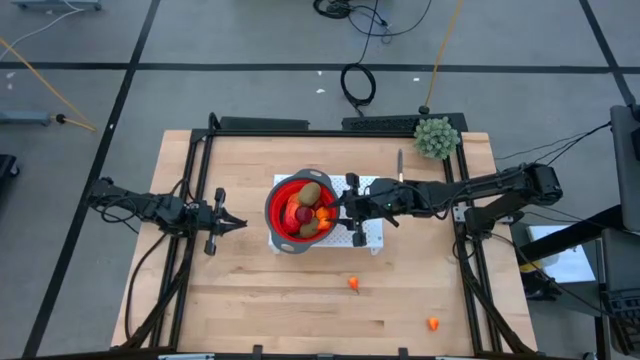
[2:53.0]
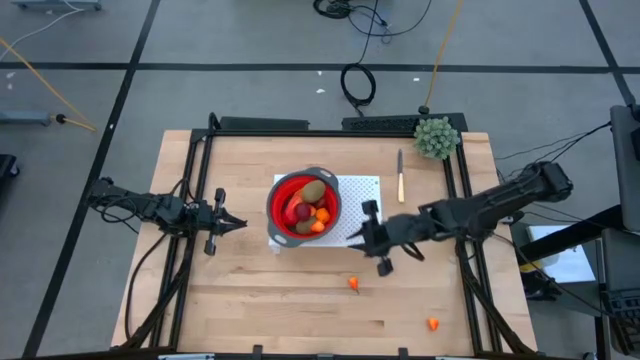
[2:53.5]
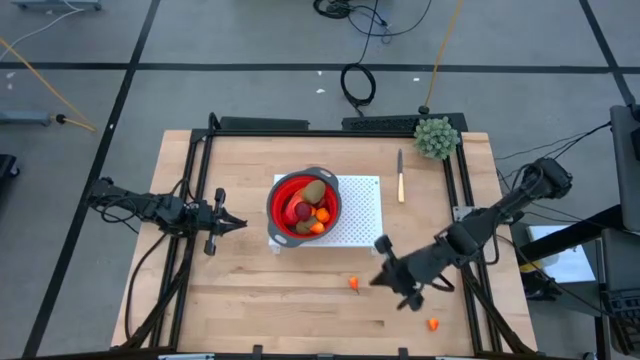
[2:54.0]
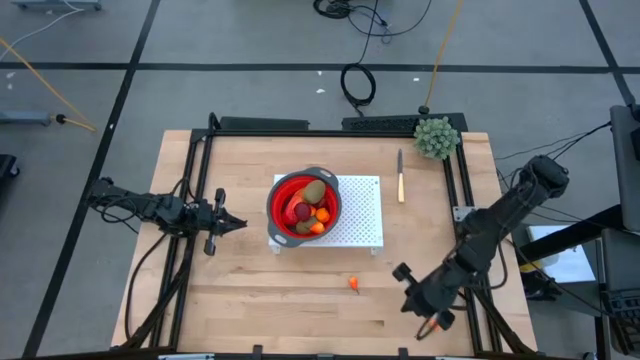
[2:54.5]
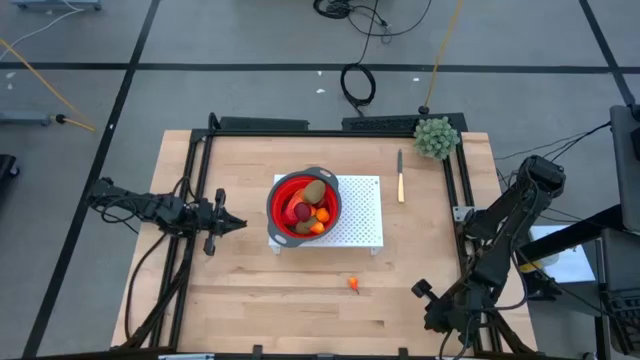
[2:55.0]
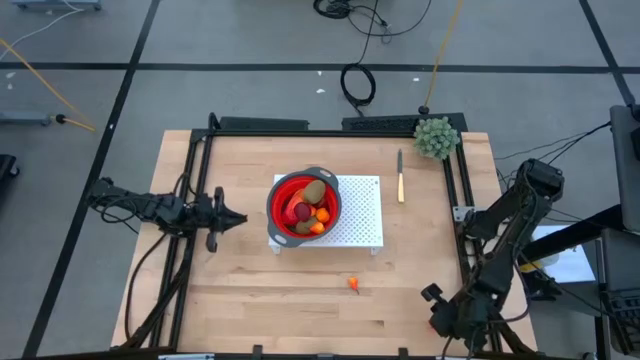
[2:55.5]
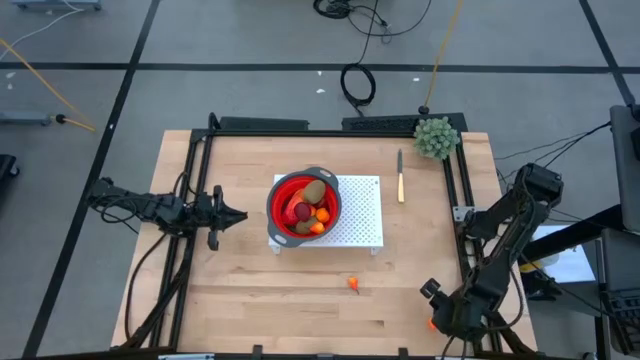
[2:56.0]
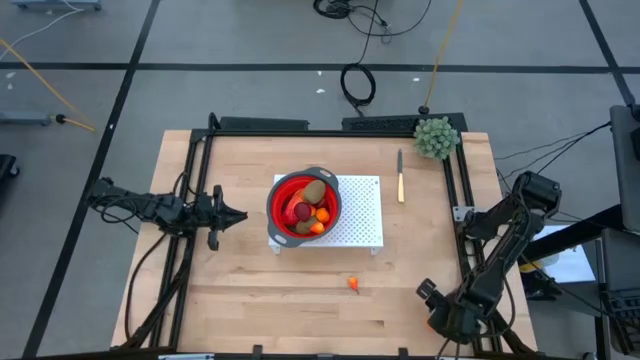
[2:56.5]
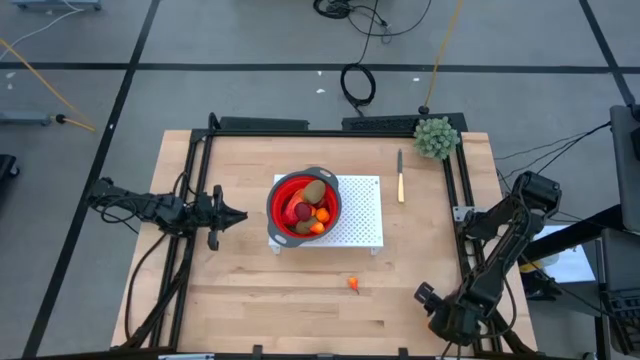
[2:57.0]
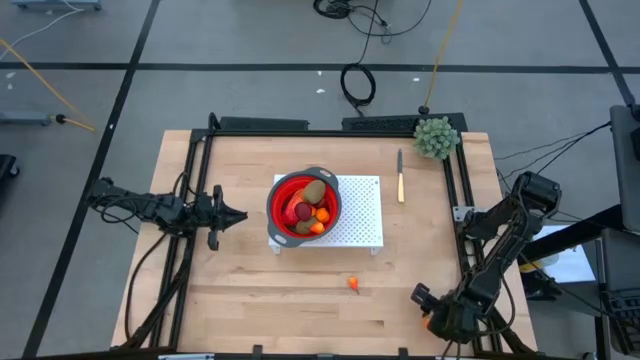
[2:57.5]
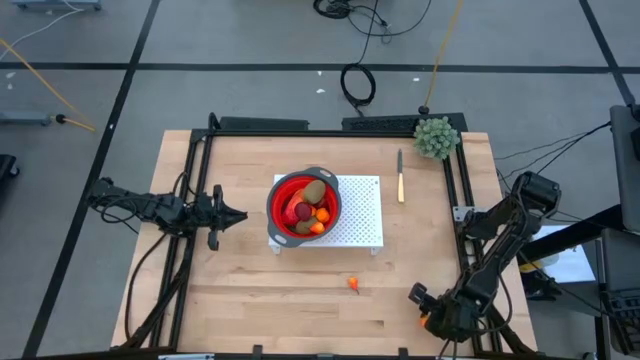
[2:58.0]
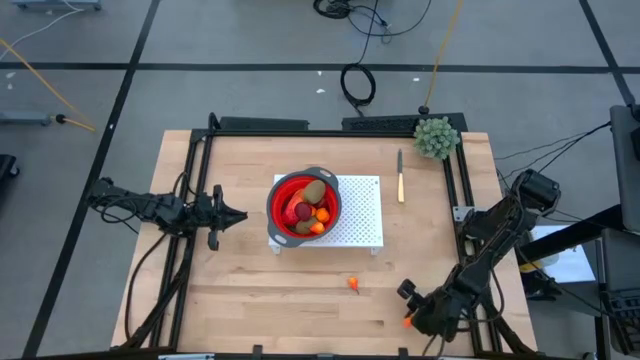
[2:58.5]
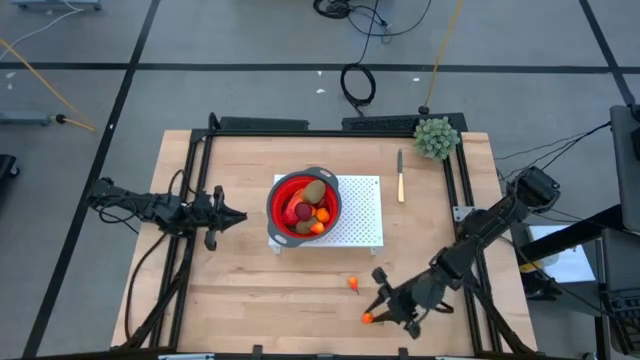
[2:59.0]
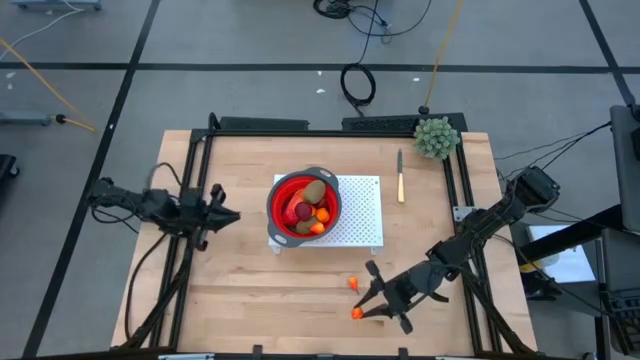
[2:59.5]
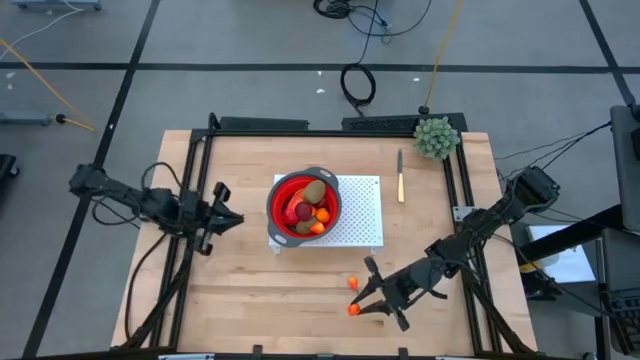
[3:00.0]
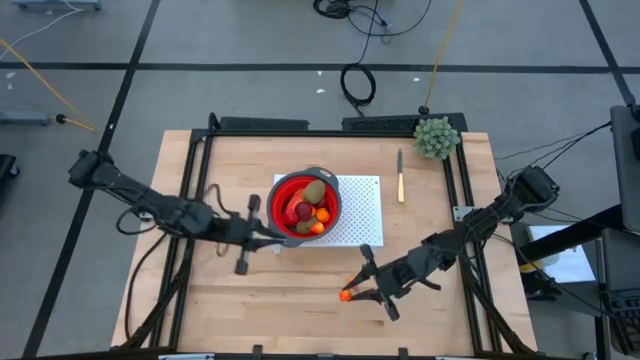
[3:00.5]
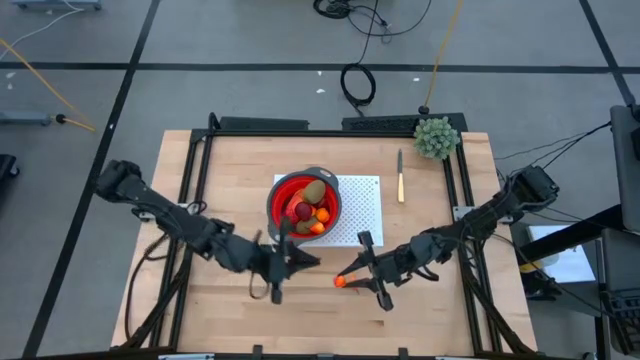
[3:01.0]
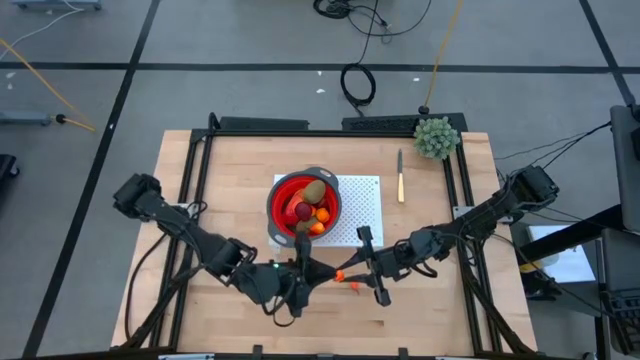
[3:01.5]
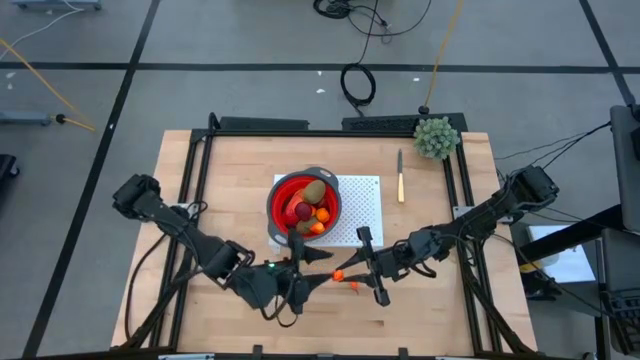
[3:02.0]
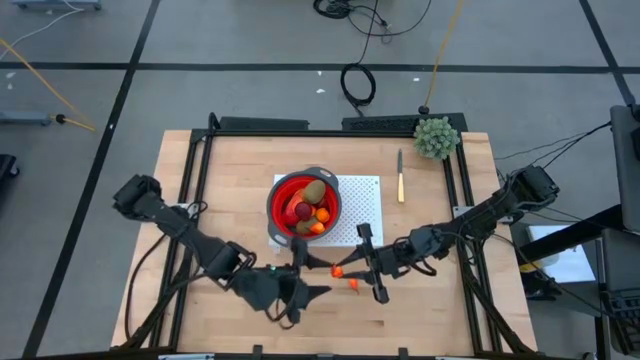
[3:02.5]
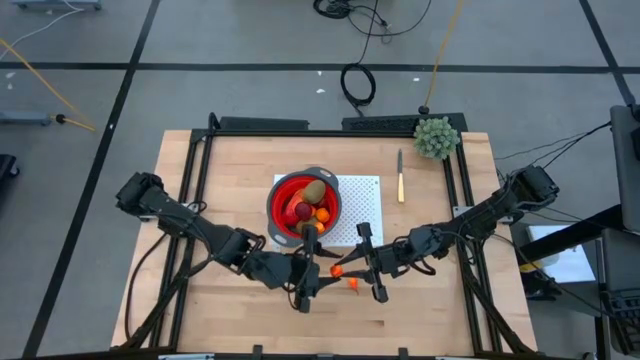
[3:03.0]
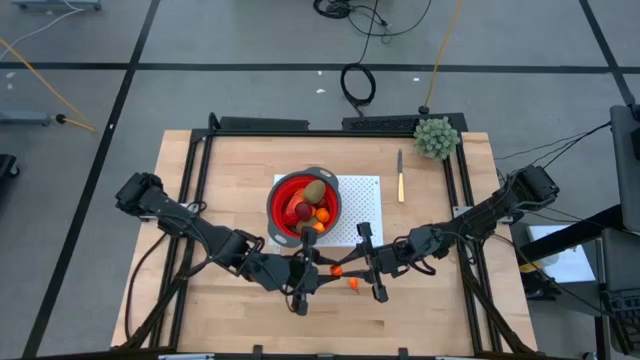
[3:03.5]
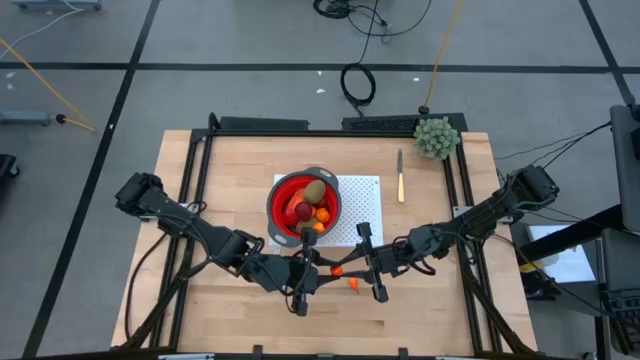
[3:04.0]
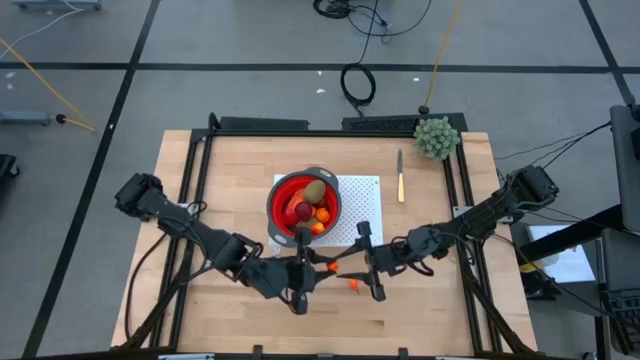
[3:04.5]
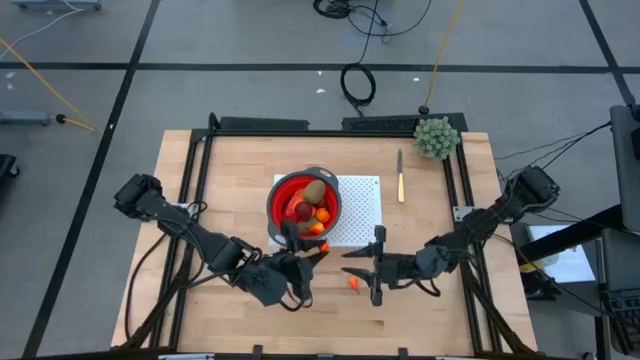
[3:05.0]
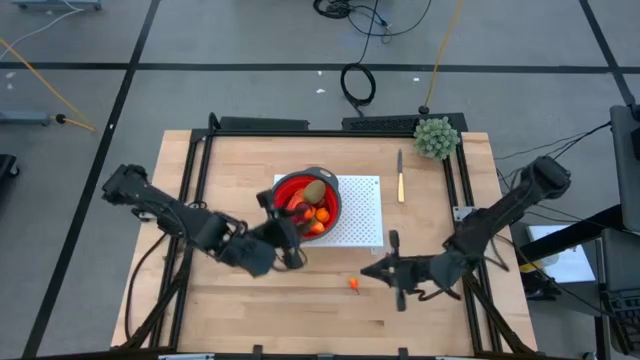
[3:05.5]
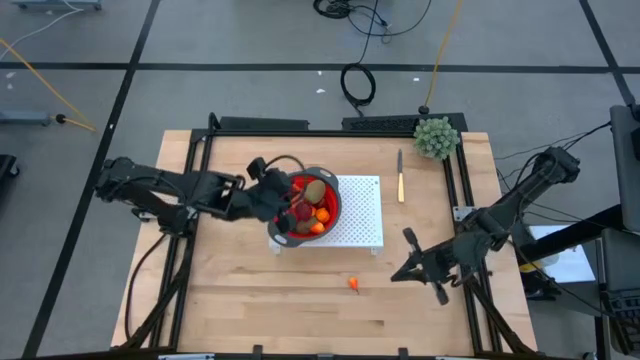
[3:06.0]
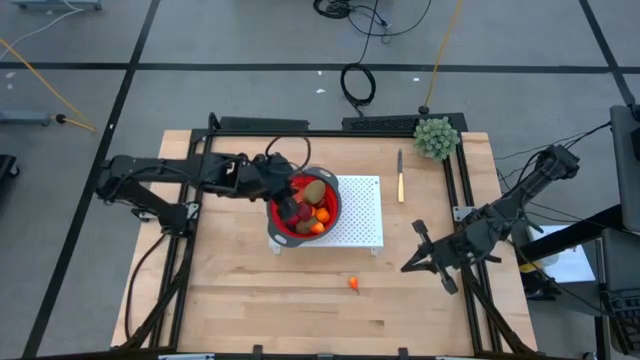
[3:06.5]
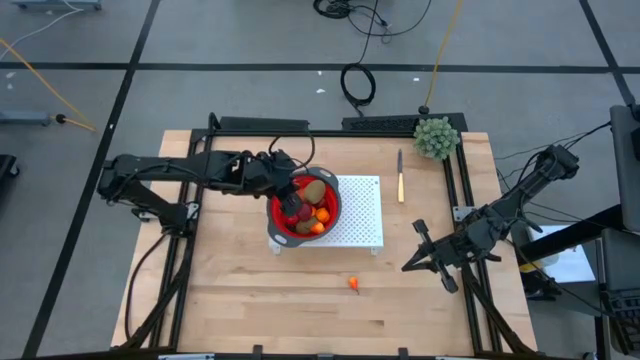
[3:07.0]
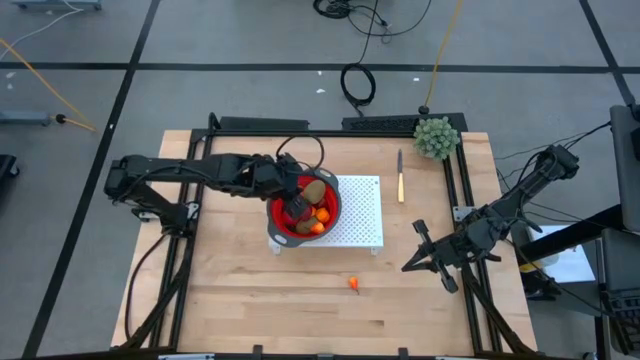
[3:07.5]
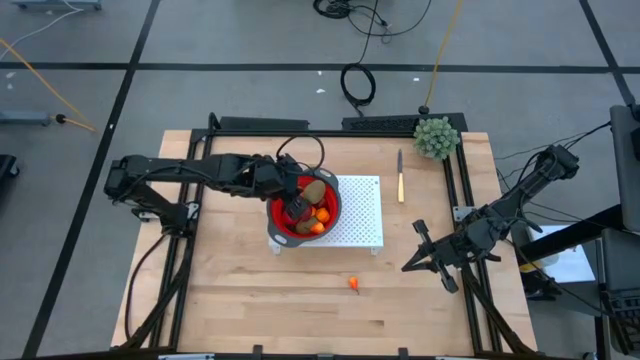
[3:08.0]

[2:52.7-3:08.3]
Task: Pick & Place Fruit
Put the bottom peach into the strainer bowl on the shelf

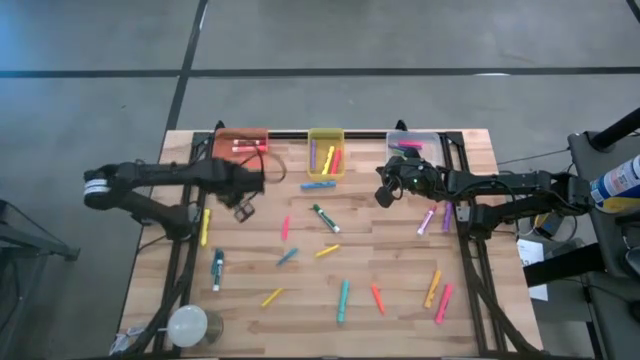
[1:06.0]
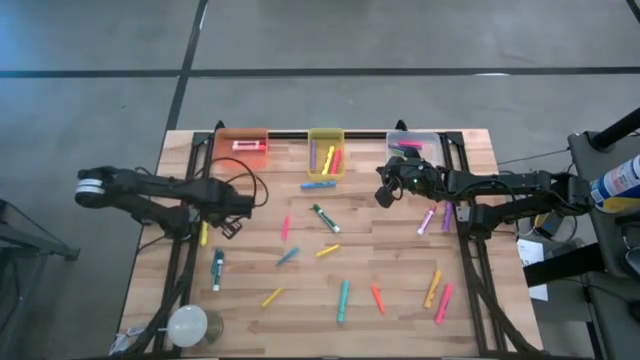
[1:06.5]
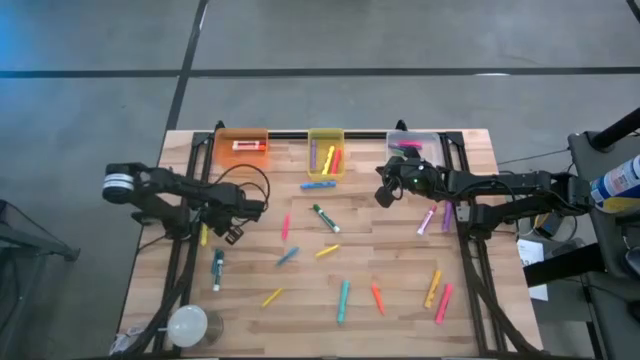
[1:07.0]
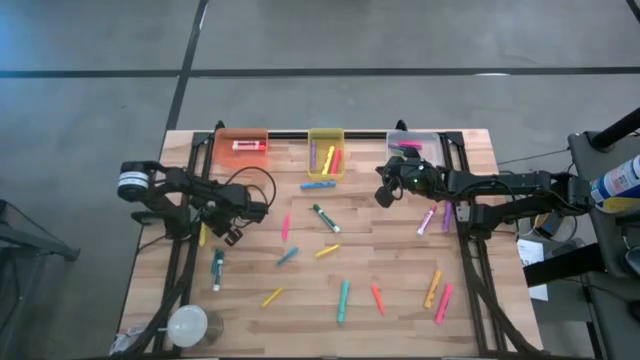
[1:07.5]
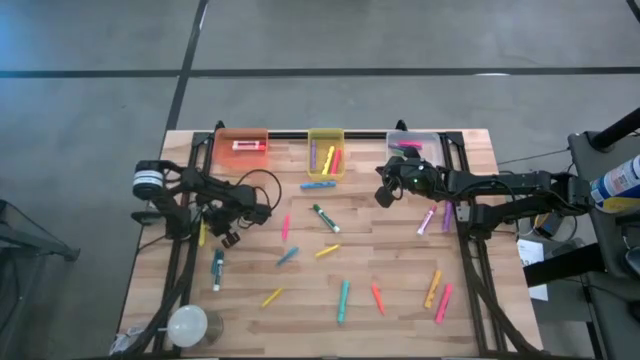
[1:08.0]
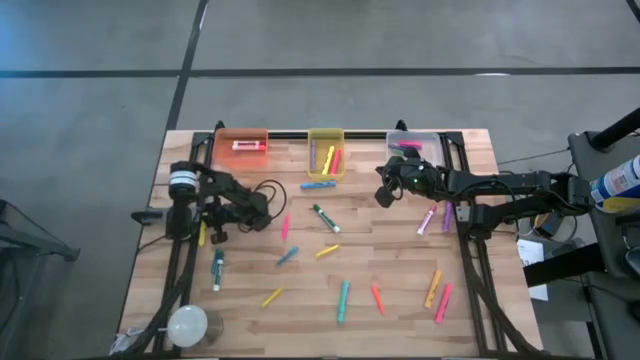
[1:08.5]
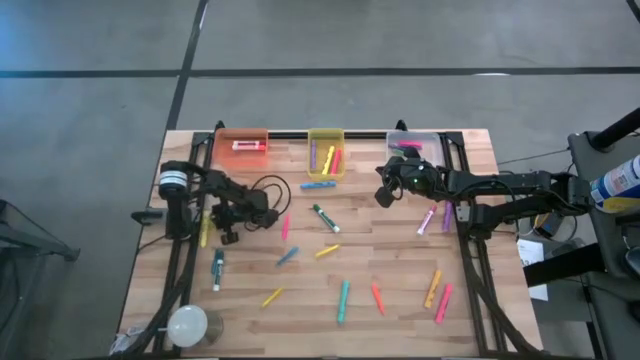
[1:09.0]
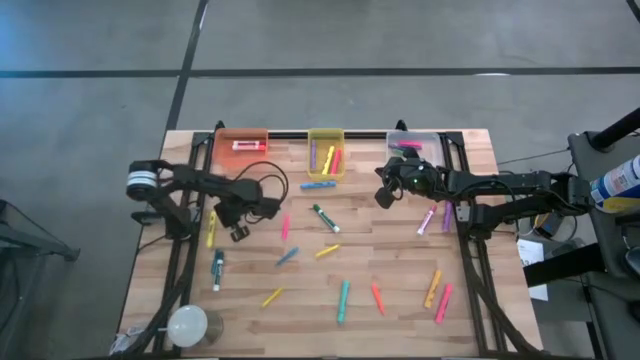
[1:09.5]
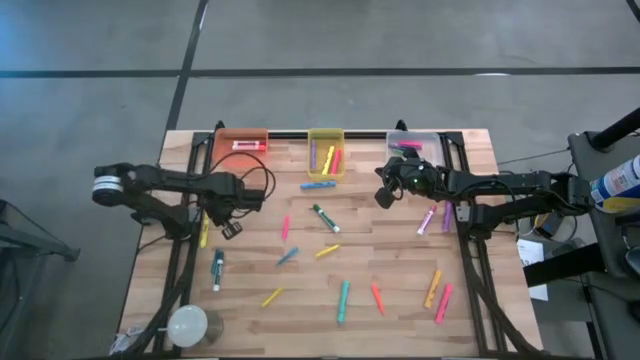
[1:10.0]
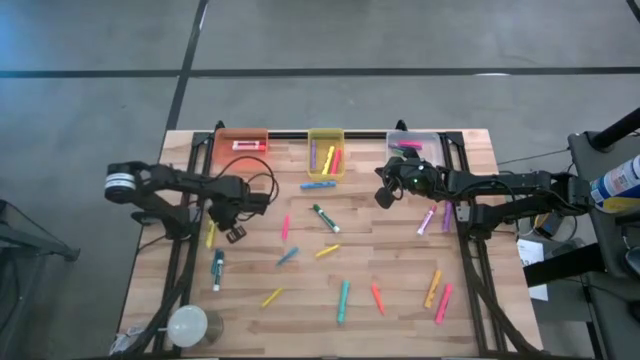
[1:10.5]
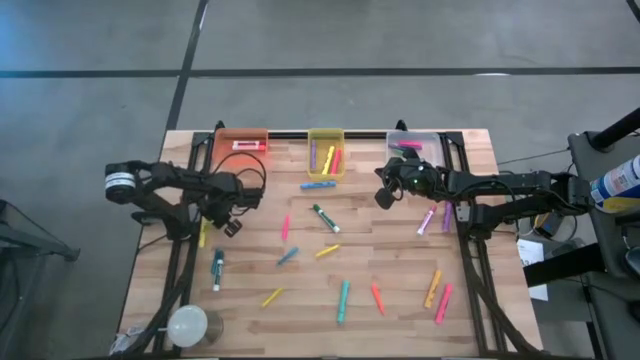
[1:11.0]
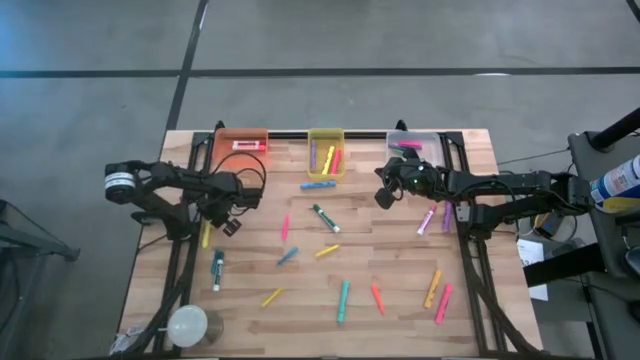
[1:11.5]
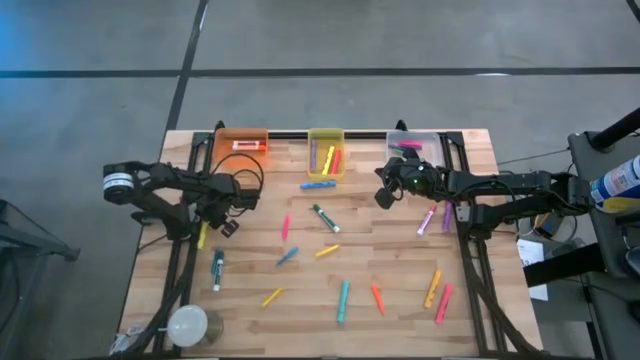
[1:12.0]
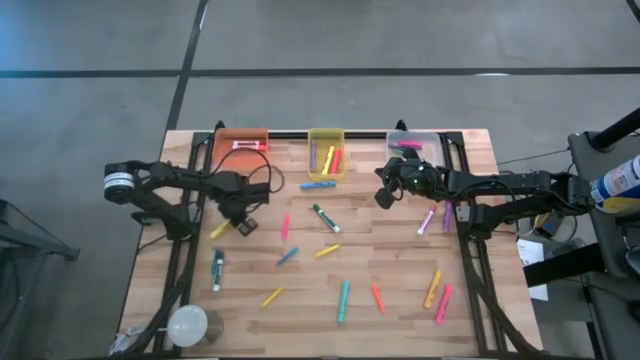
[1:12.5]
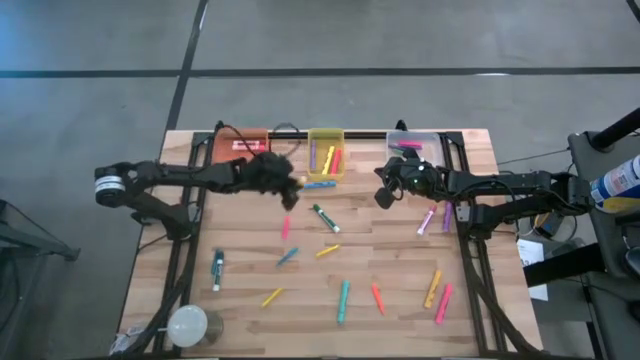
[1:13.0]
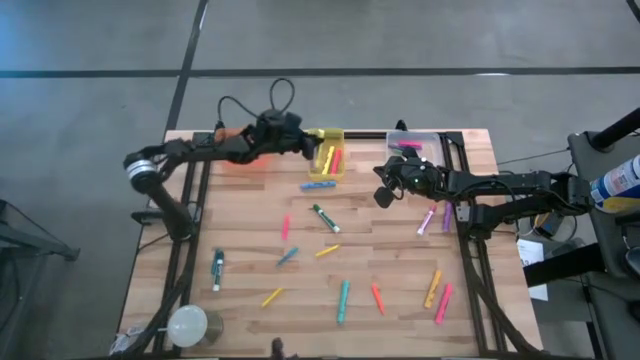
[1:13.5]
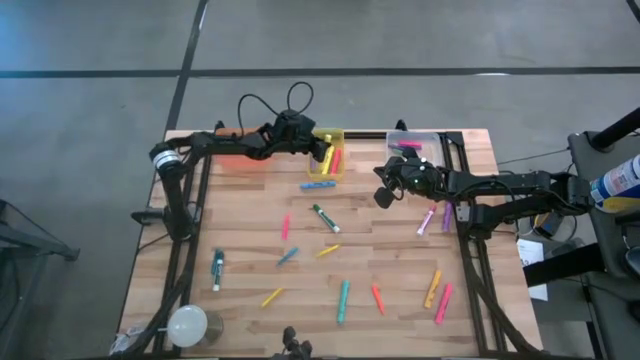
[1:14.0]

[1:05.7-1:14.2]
Task: Pick & Place Markers
Put the yellow highlighter pen into the yellow bin
